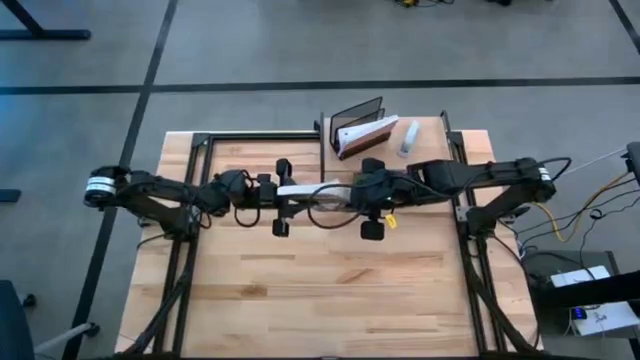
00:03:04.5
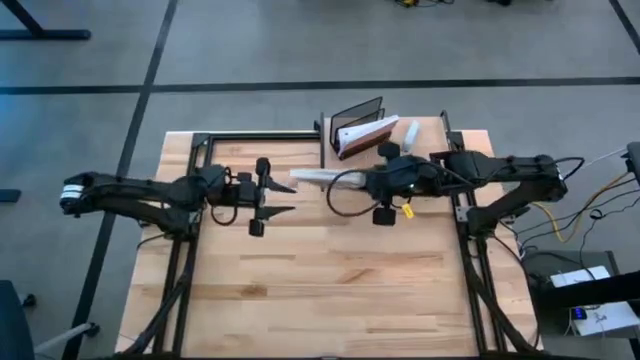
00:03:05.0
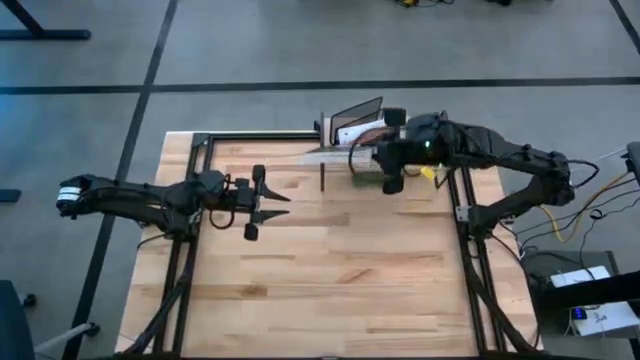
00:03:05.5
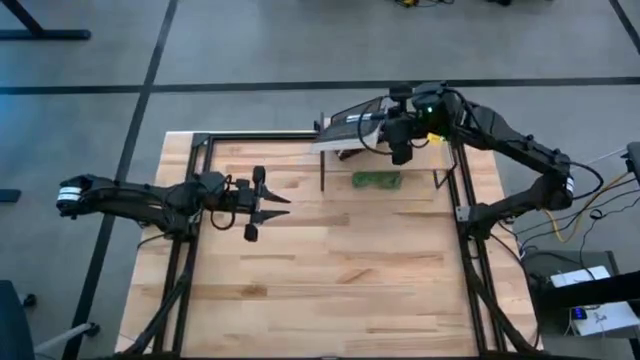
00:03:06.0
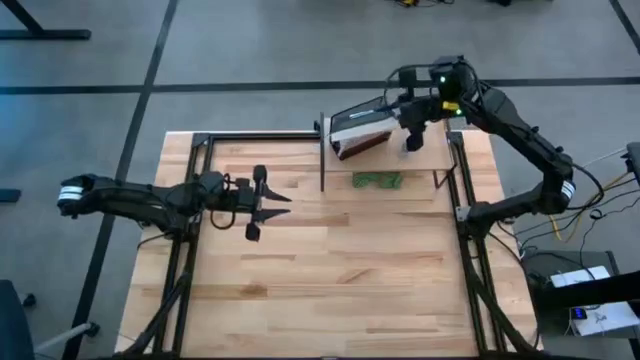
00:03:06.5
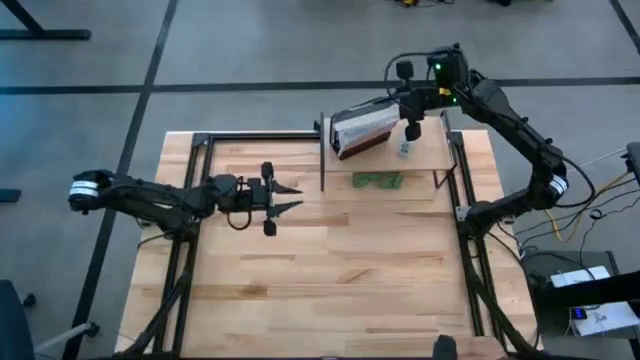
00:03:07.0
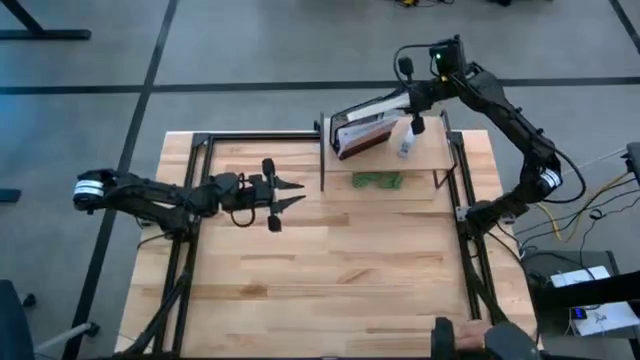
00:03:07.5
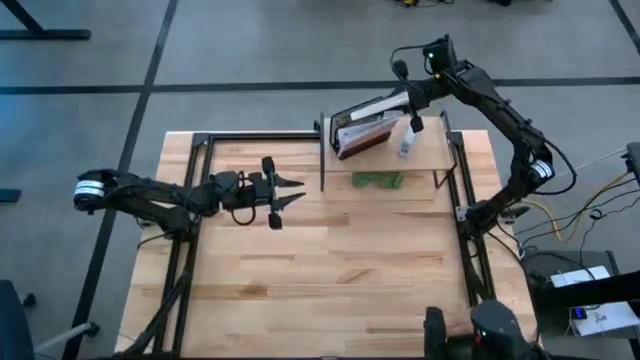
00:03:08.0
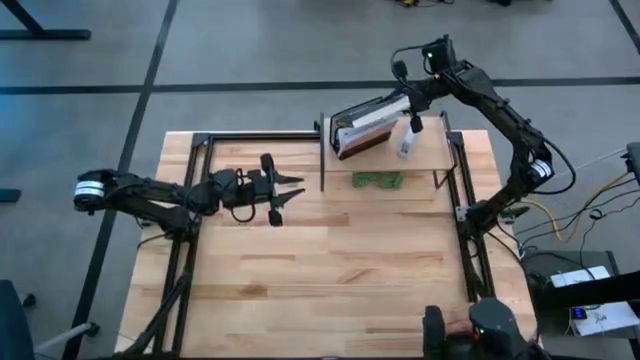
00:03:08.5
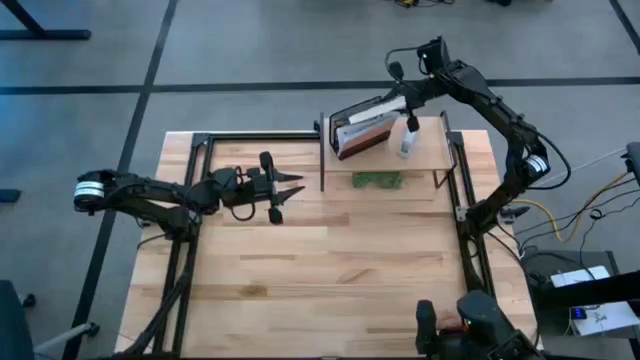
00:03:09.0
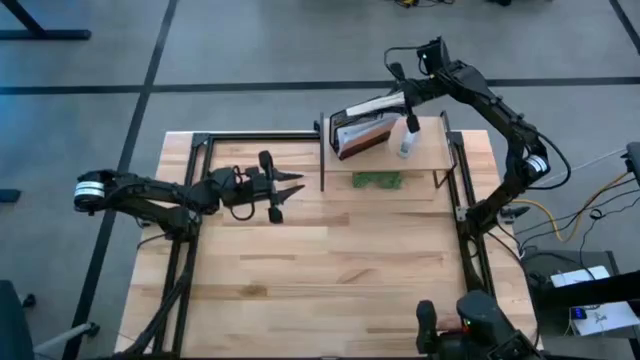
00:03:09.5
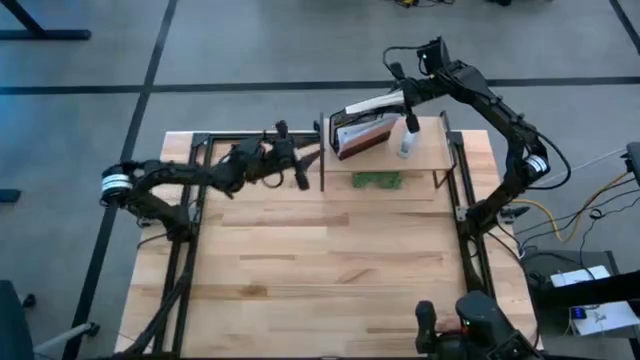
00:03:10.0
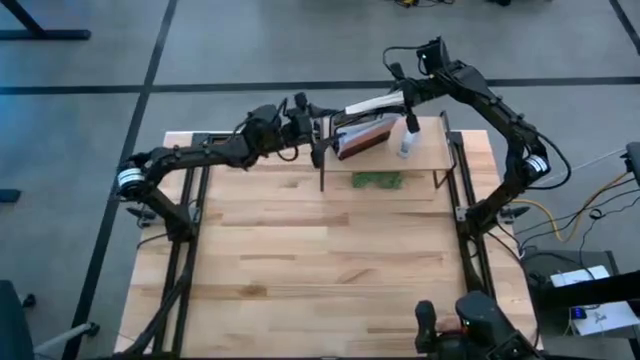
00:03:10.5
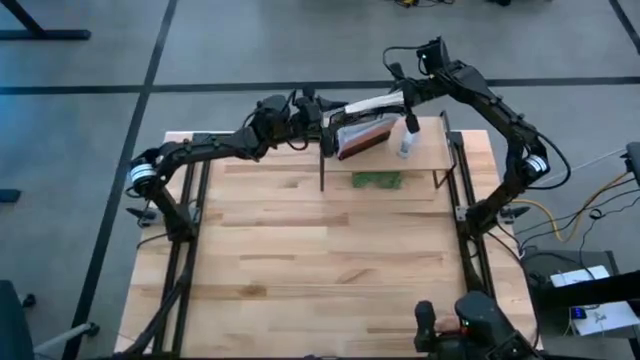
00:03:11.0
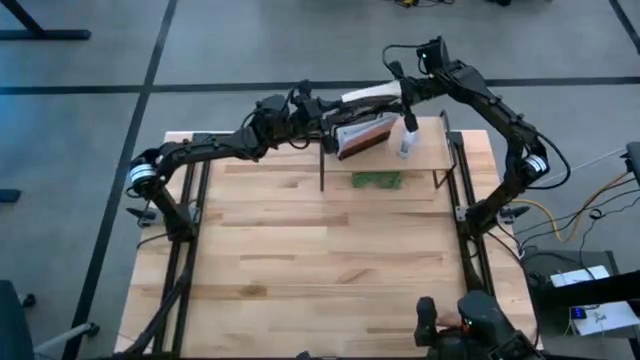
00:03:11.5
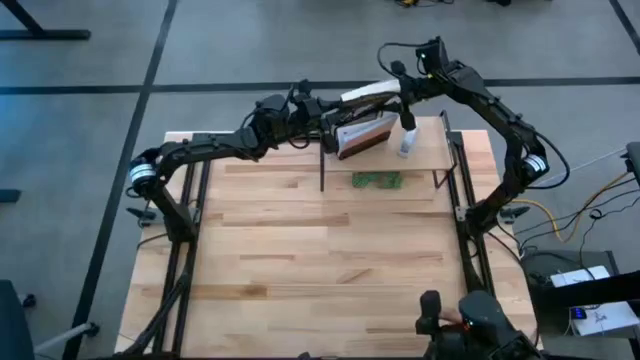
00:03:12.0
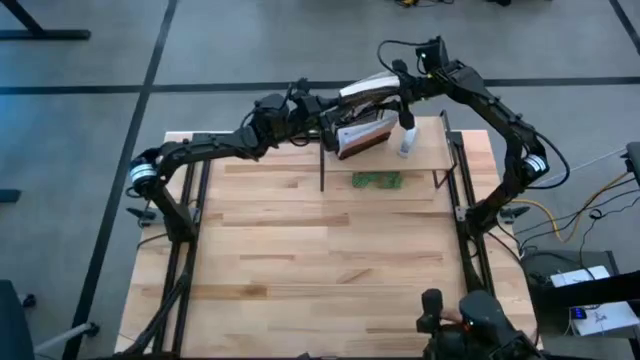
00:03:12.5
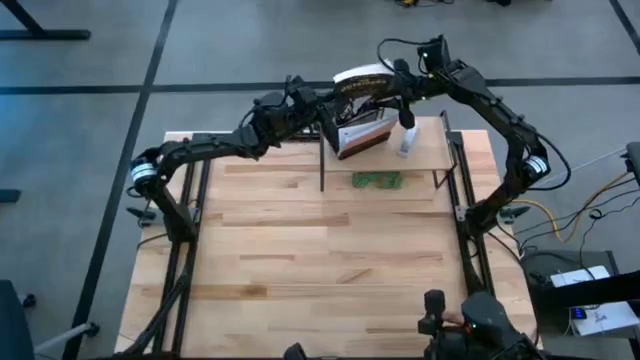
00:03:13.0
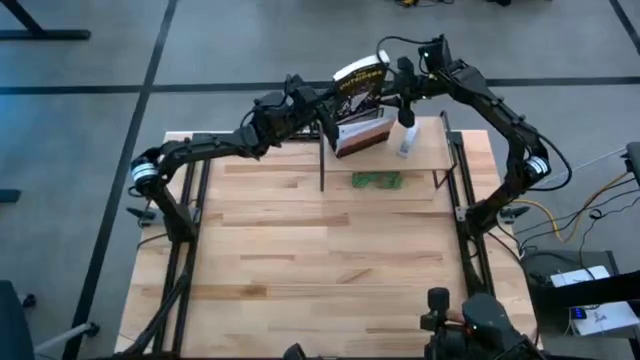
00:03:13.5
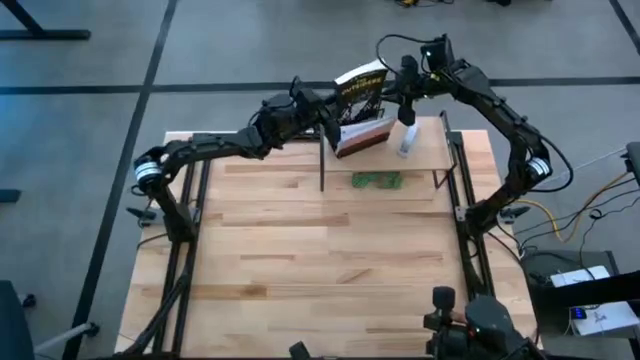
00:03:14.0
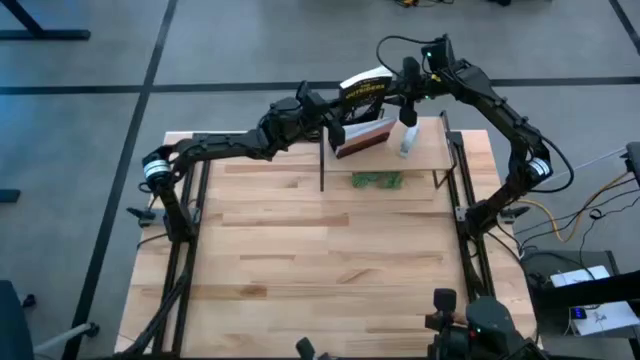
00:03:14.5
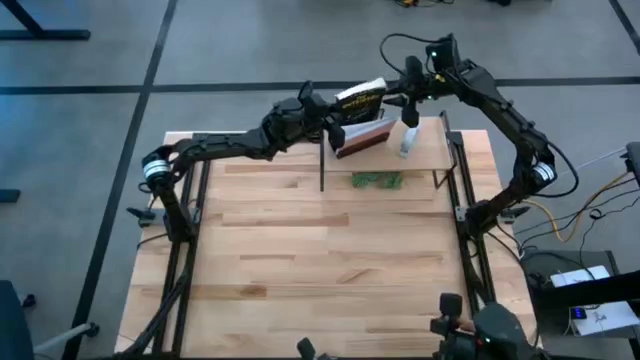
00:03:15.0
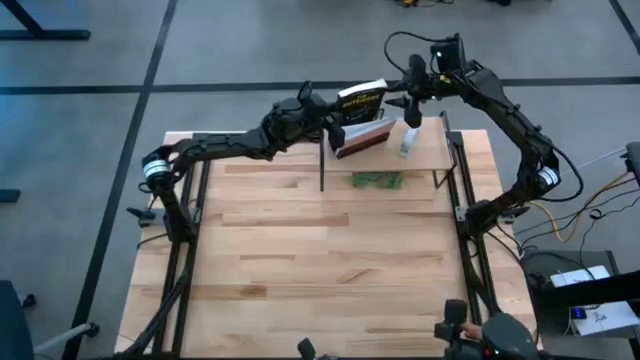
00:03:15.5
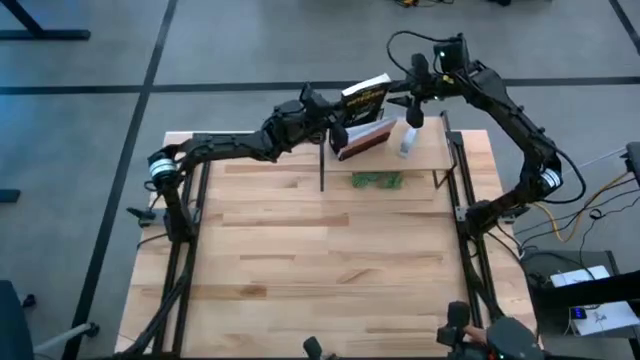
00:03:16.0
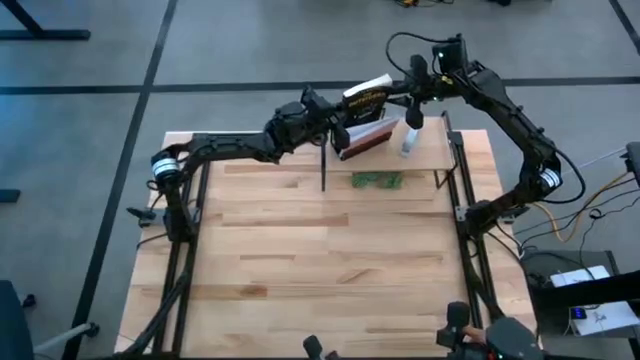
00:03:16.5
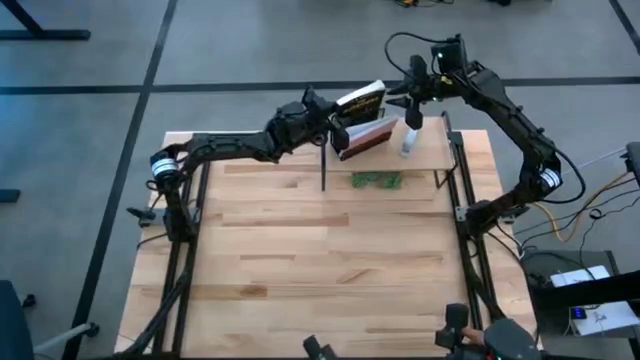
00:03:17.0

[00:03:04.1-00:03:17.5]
Task: Stock shelves
Put the black book into the black desk organizer on the shelf

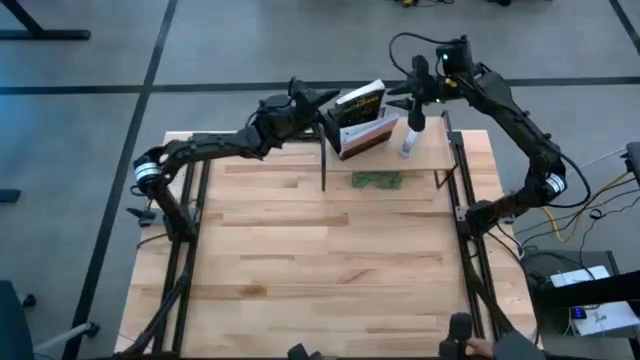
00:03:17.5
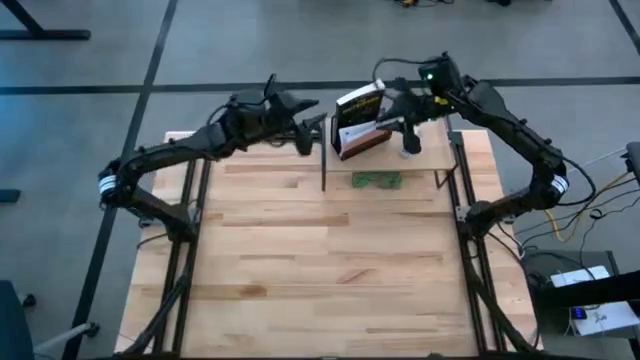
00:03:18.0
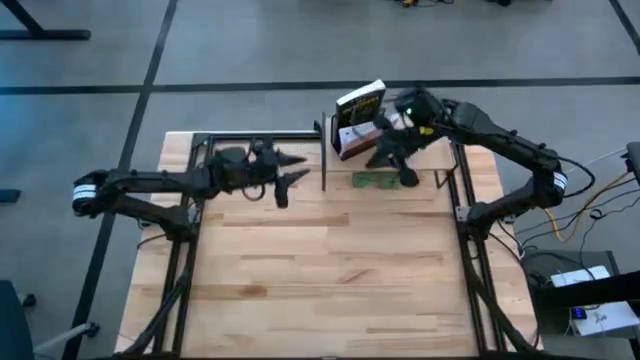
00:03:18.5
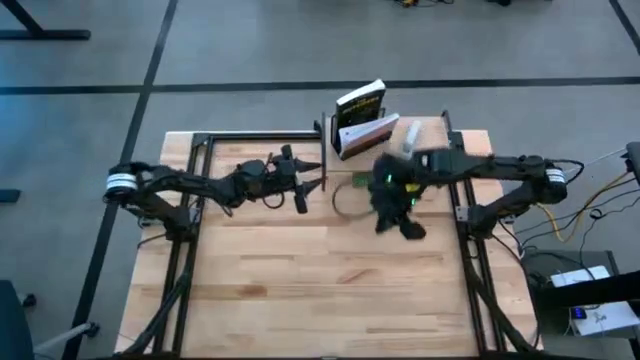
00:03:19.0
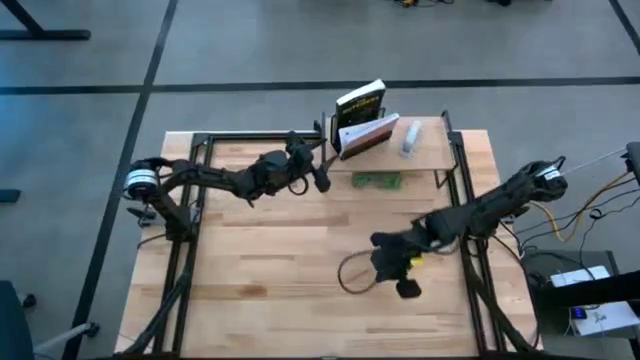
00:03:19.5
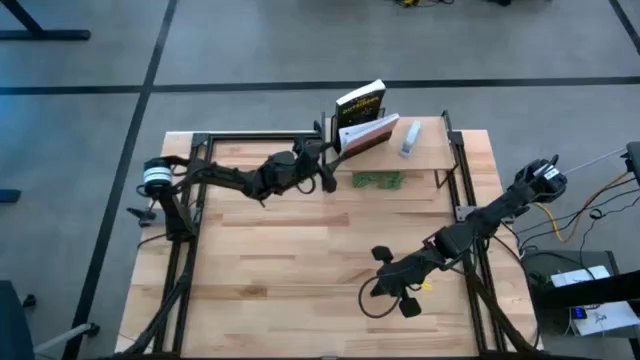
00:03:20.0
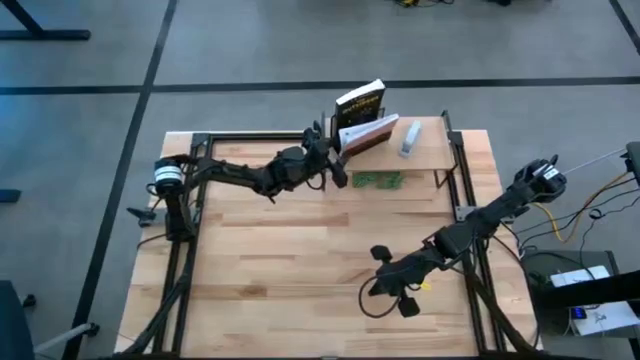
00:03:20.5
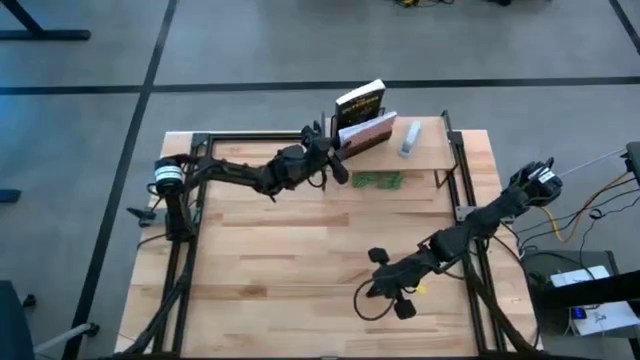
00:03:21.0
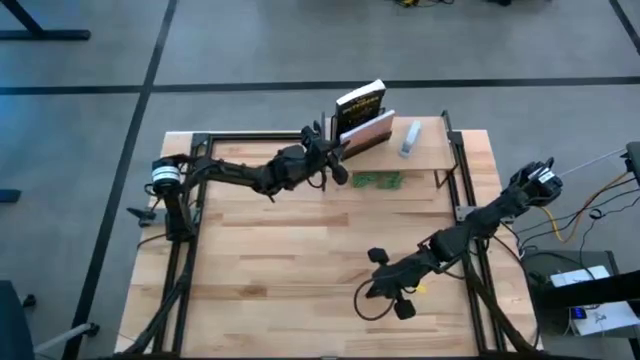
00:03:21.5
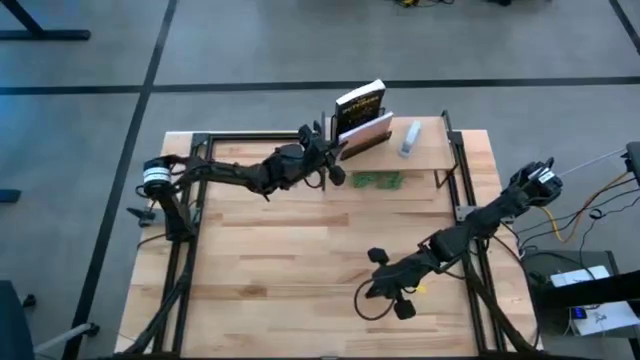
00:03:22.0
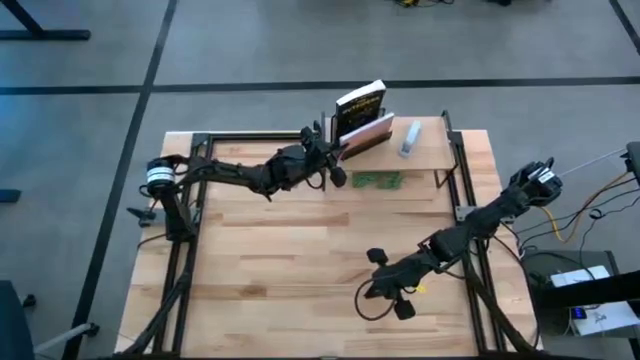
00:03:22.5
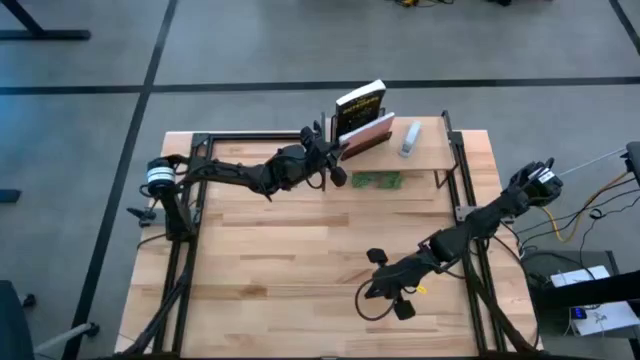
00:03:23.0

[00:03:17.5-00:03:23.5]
Adjust the pink notebook in the black desk organizer on the shelf

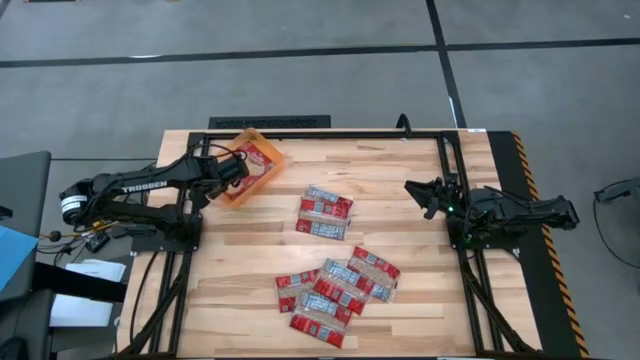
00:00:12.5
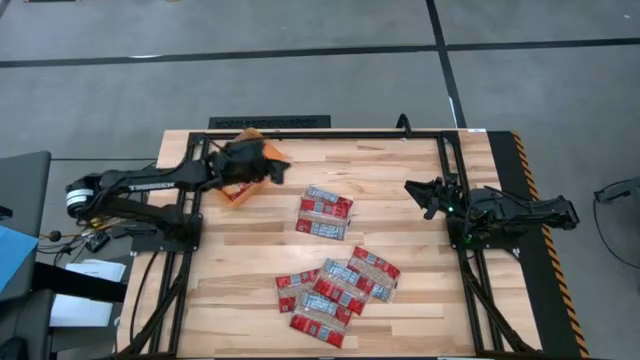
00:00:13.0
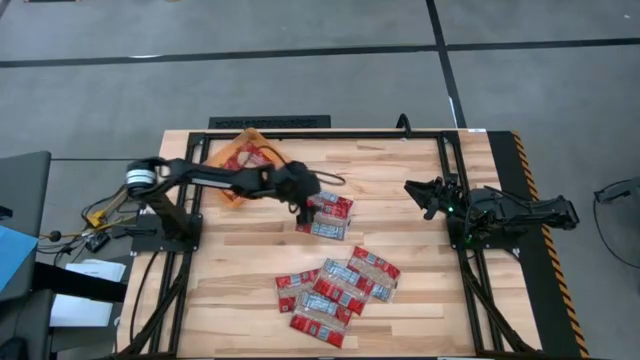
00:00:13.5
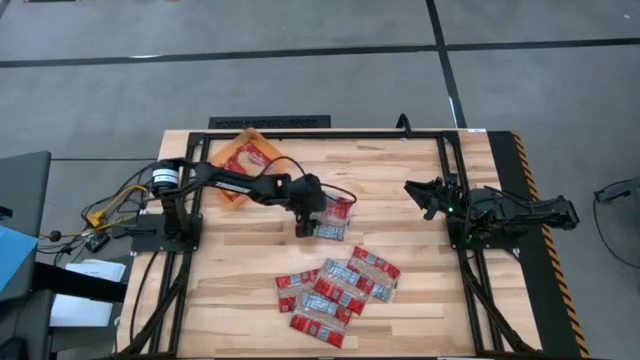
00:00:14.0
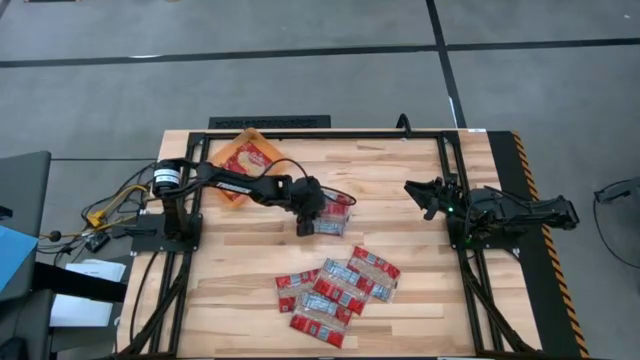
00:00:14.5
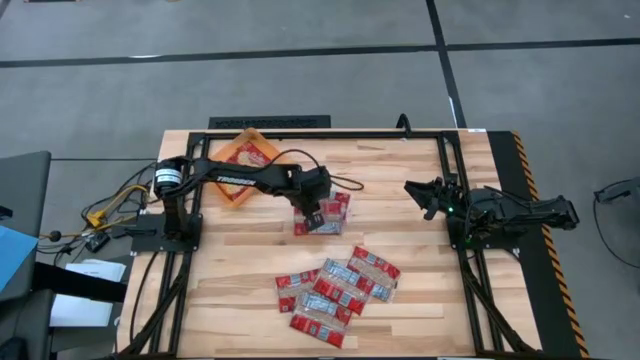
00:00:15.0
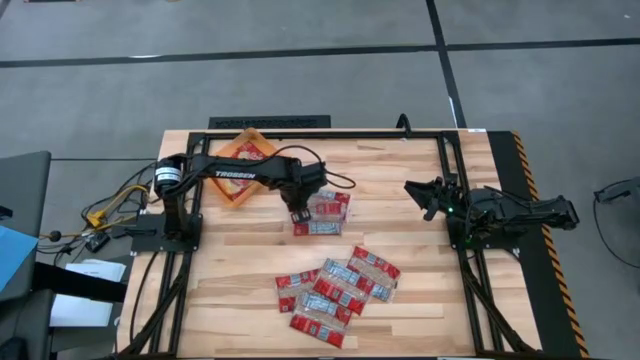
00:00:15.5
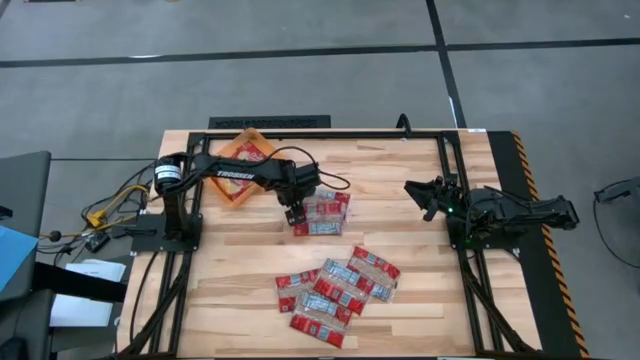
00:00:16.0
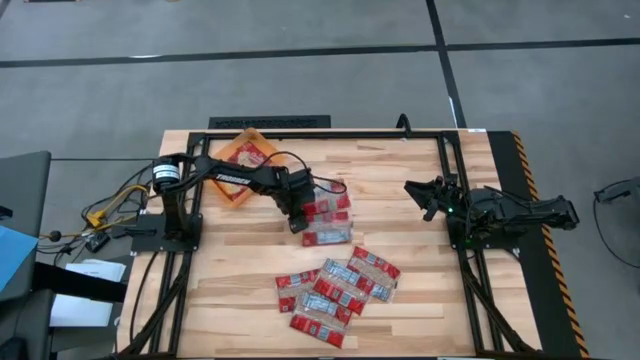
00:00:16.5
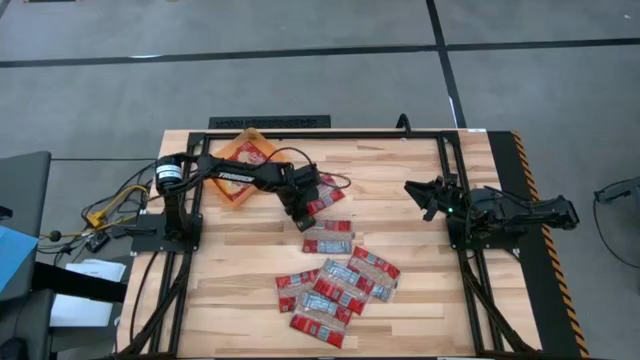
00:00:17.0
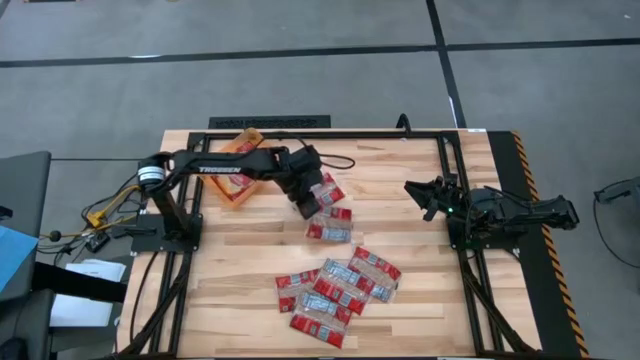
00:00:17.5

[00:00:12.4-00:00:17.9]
Task: Sort popcorn bags into baskets
Put the red popcorn pack into the orange bin
